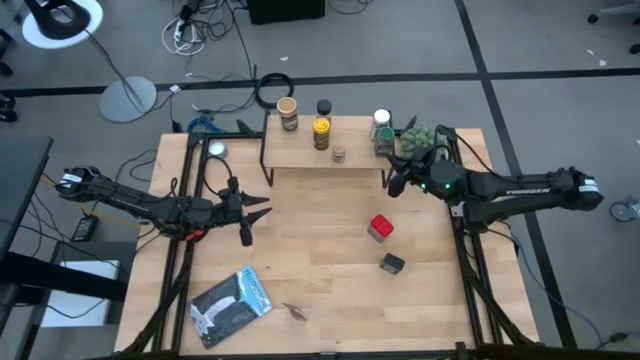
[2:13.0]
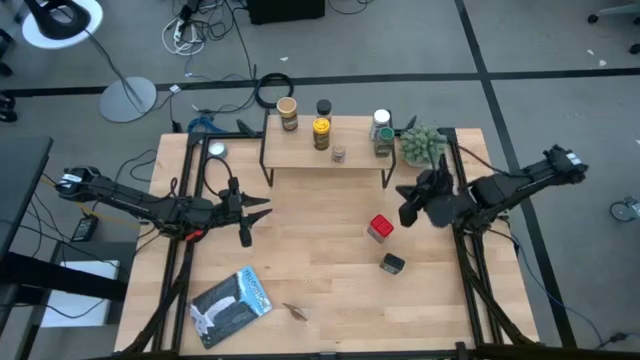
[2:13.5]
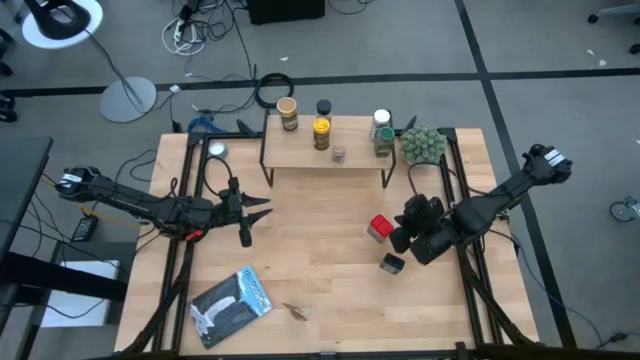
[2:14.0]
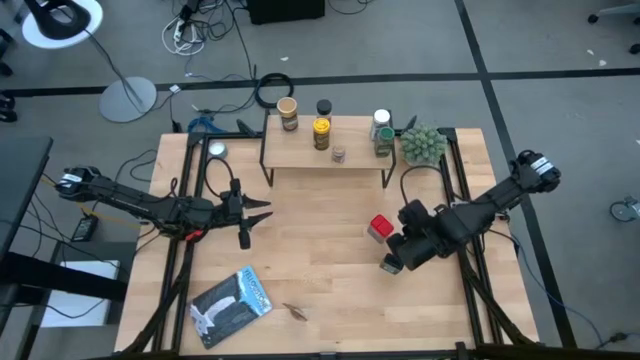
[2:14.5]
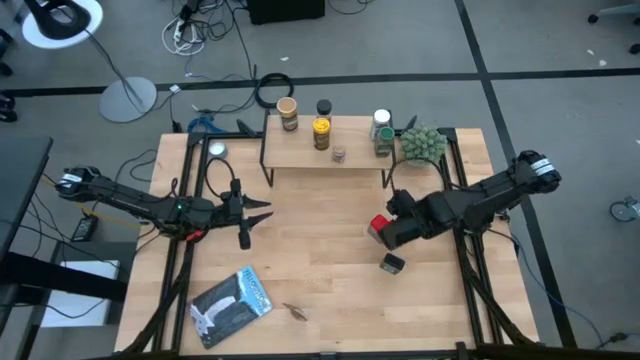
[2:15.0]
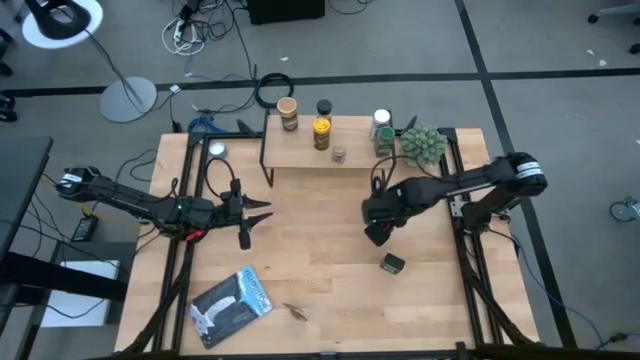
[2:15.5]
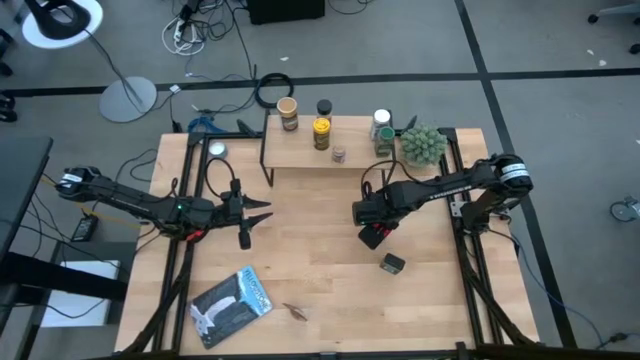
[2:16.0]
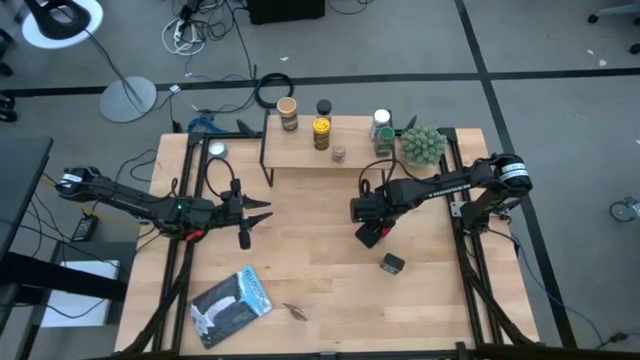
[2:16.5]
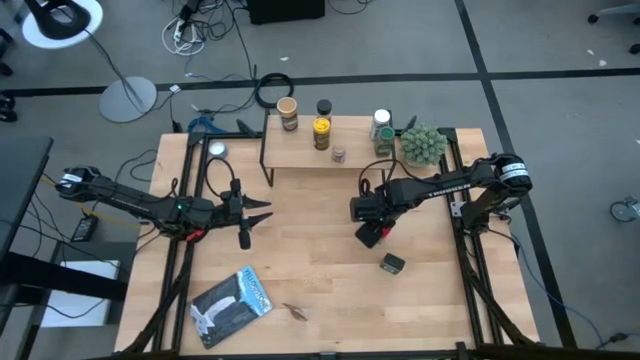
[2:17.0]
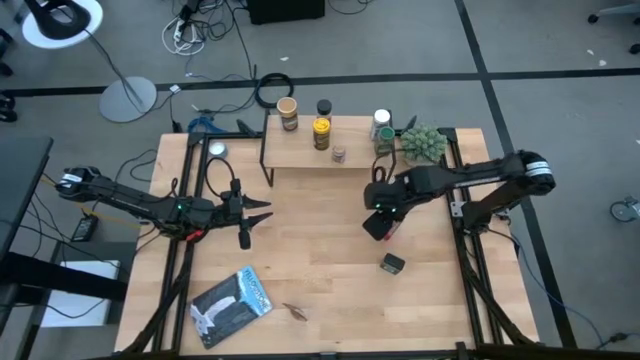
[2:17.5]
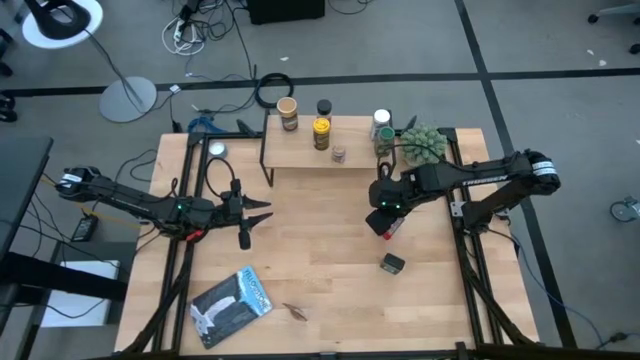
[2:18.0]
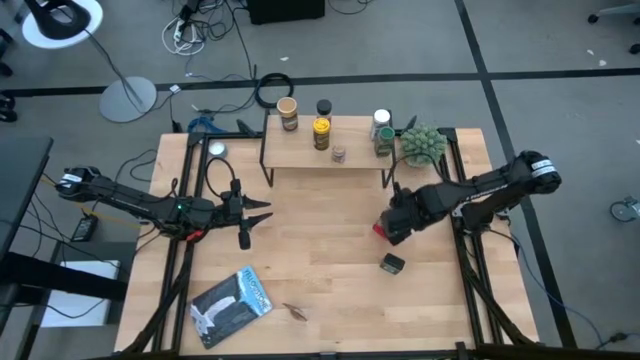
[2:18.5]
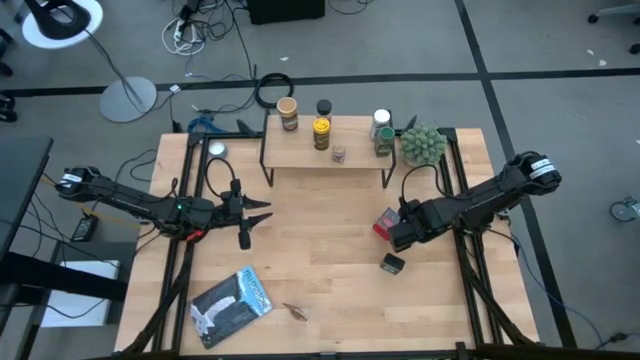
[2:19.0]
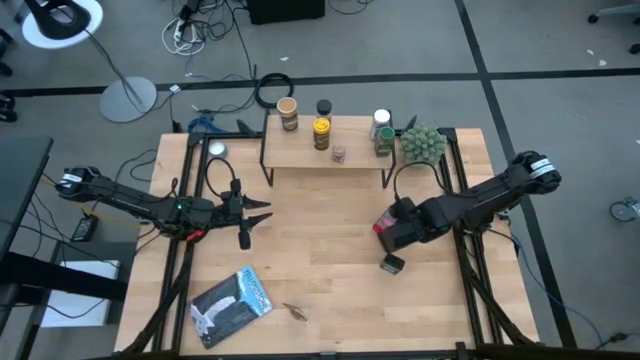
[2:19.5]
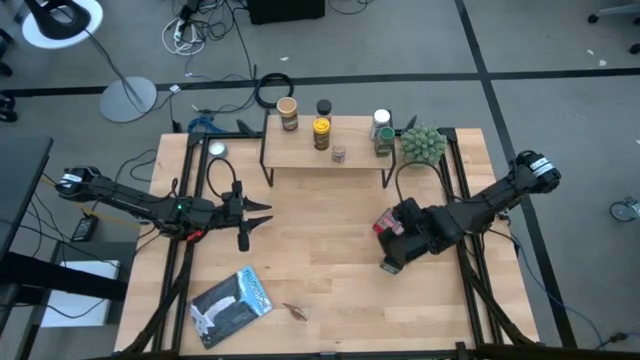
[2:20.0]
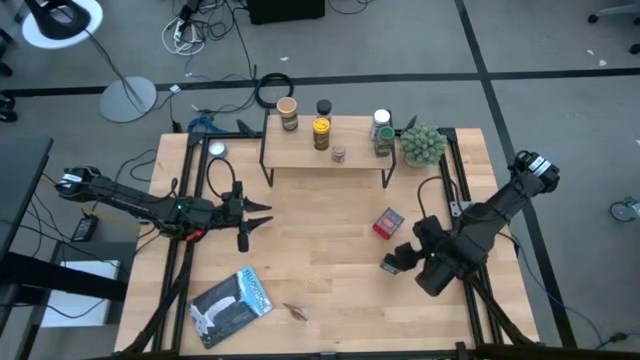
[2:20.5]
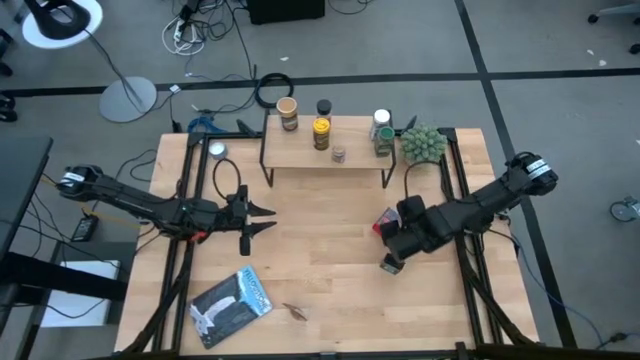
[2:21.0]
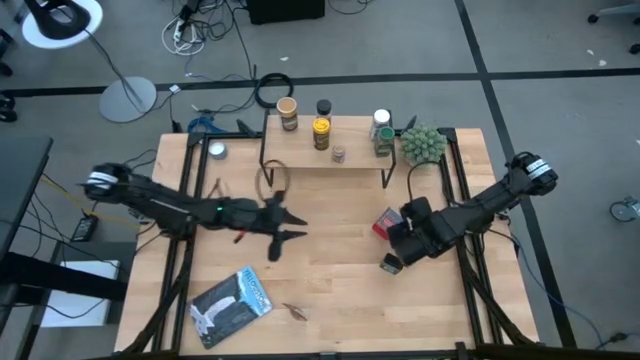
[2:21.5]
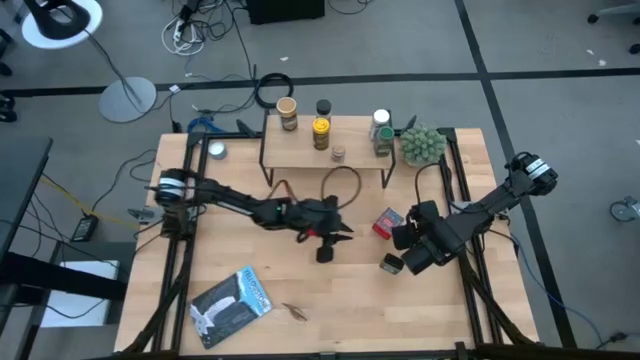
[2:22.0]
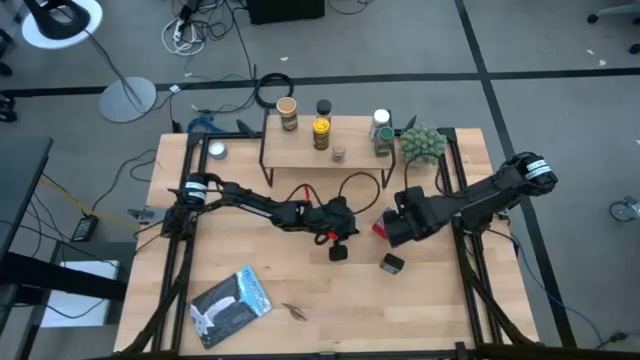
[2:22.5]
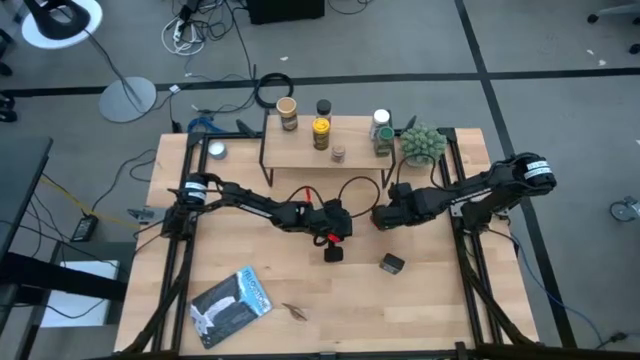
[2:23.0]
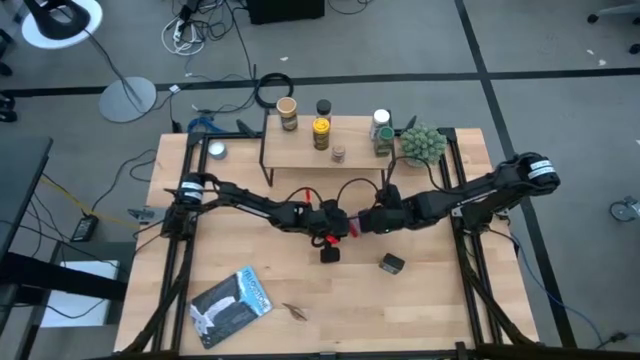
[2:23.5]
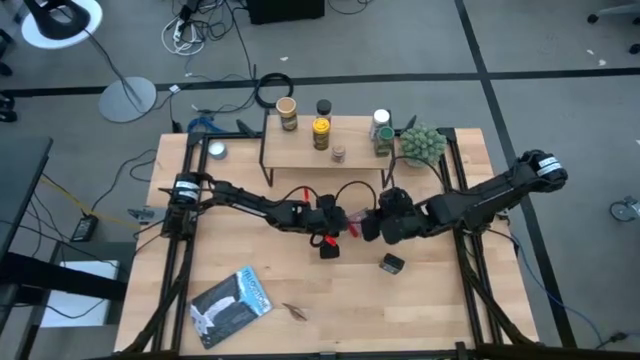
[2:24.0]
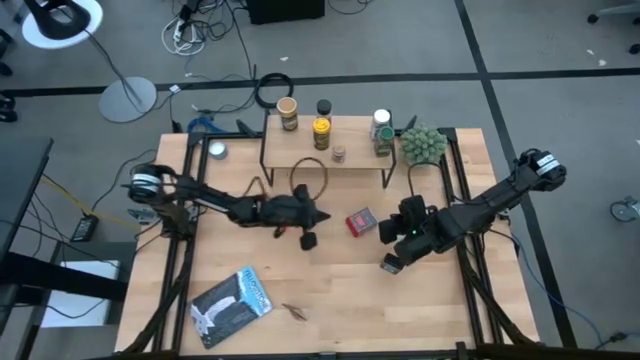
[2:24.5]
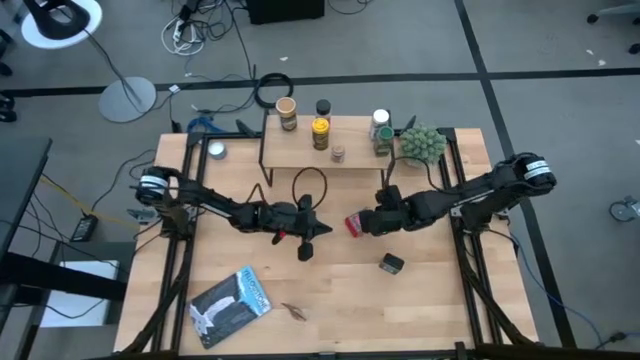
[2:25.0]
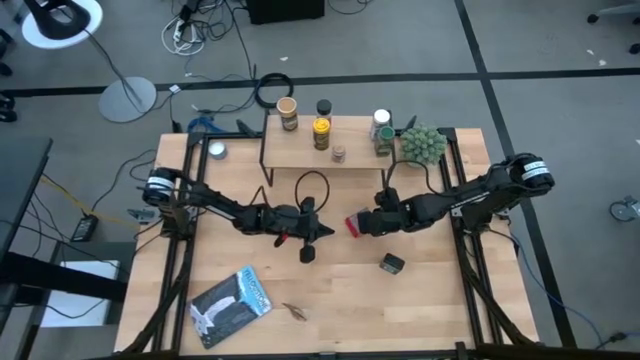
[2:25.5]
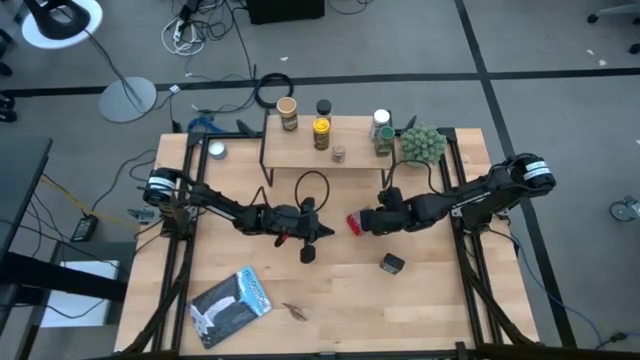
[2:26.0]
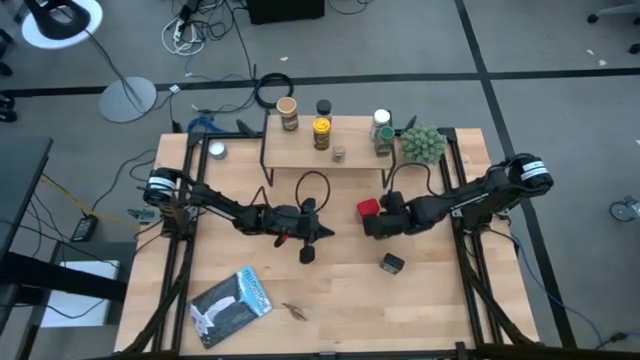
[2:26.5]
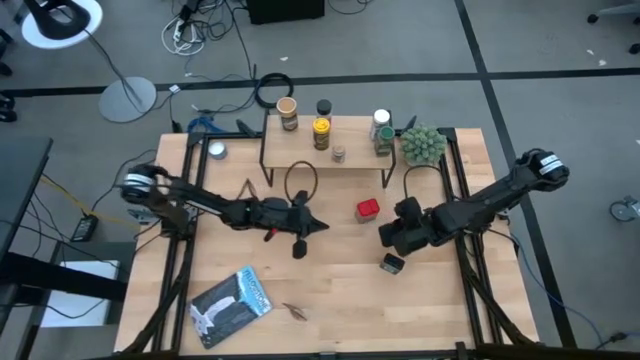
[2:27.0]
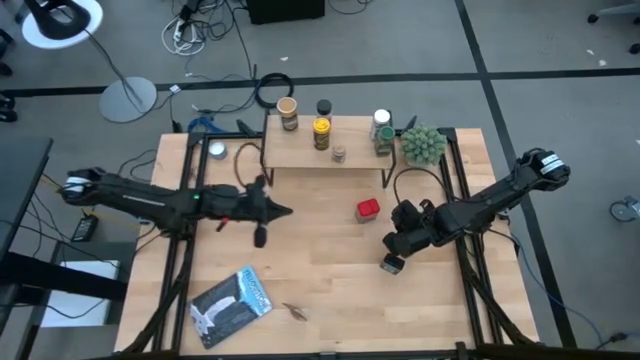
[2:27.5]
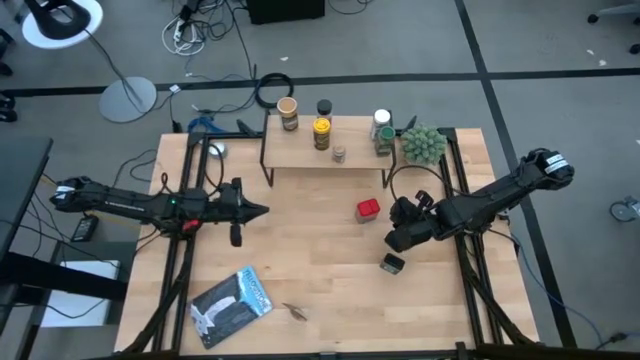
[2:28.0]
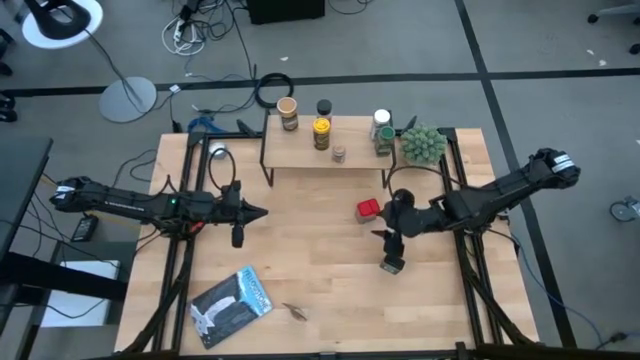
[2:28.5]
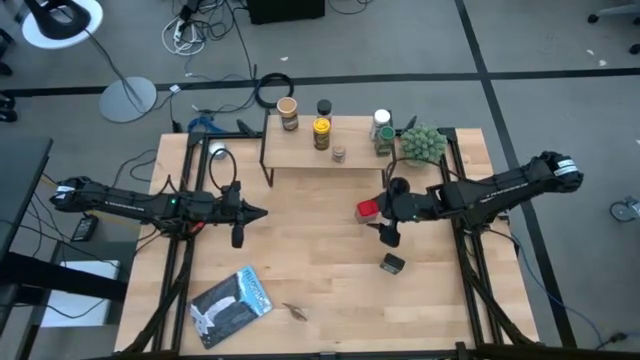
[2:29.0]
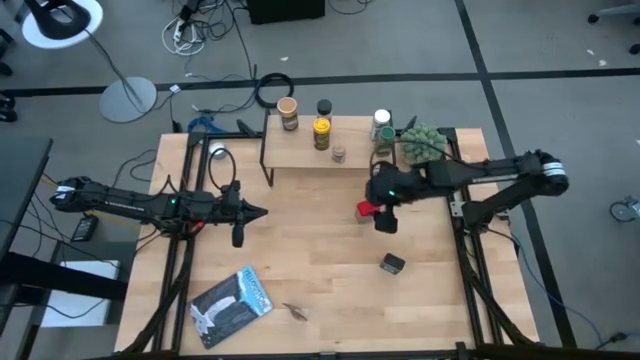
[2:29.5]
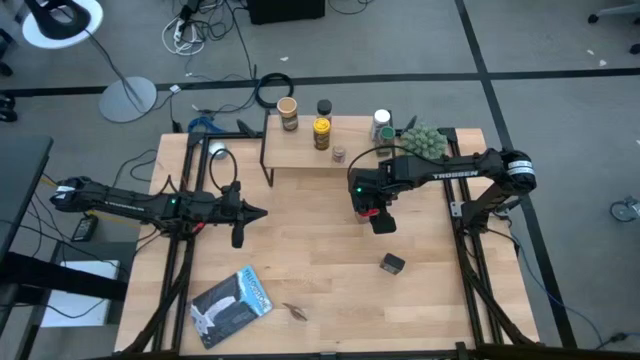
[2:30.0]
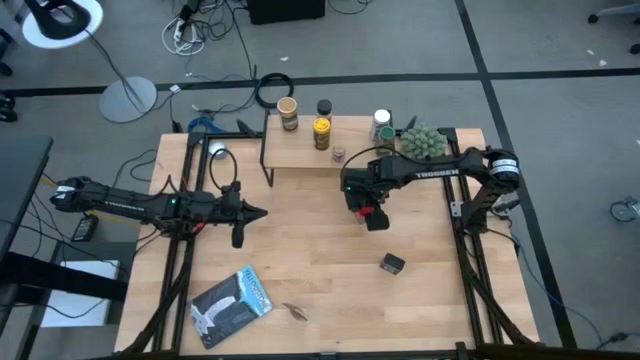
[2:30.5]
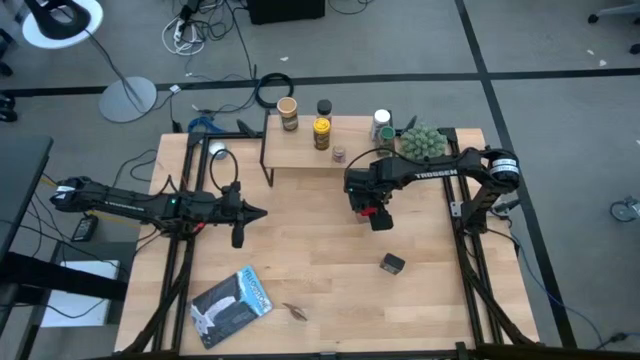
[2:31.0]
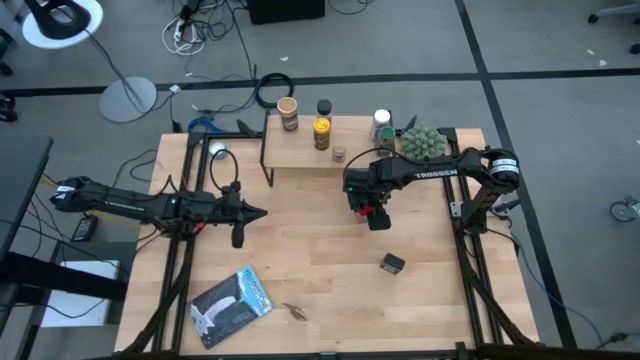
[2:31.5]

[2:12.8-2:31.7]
Task: Shelf spices
Put the red seasoning can on the shelf

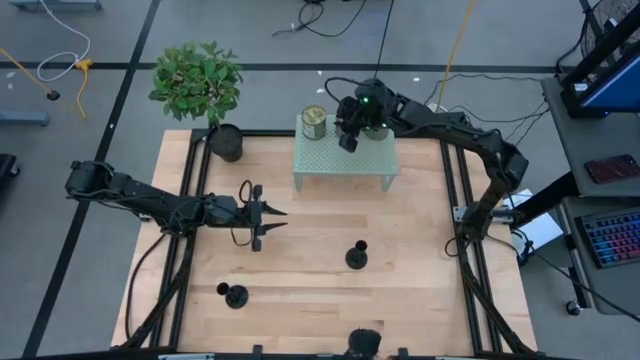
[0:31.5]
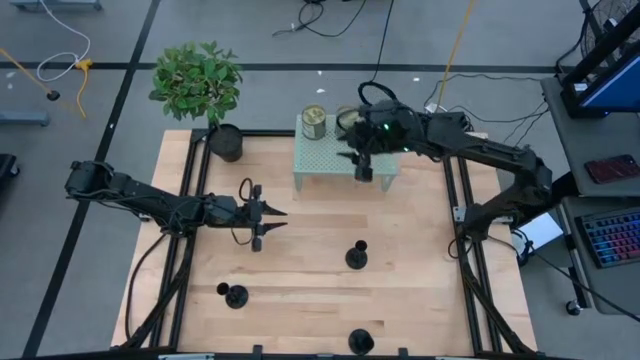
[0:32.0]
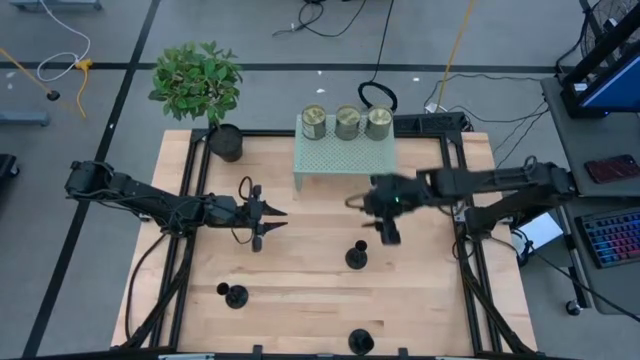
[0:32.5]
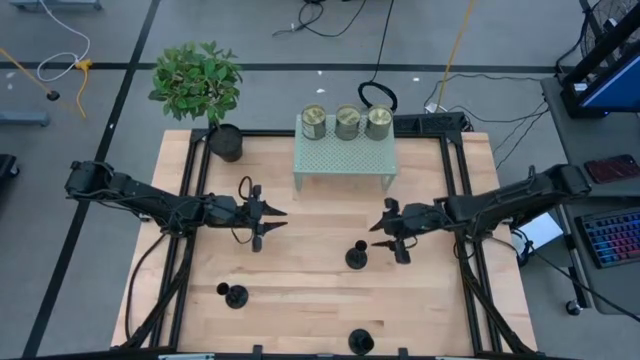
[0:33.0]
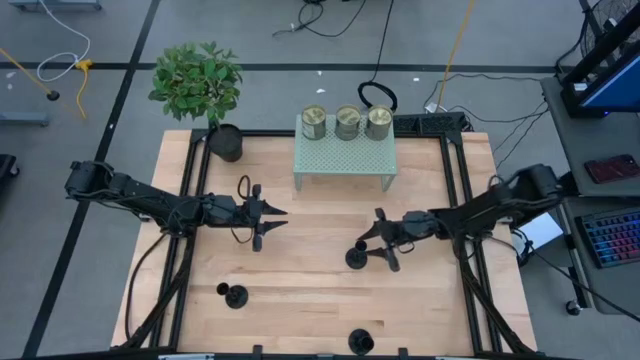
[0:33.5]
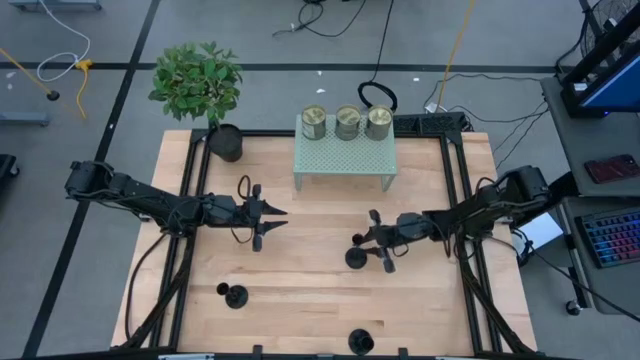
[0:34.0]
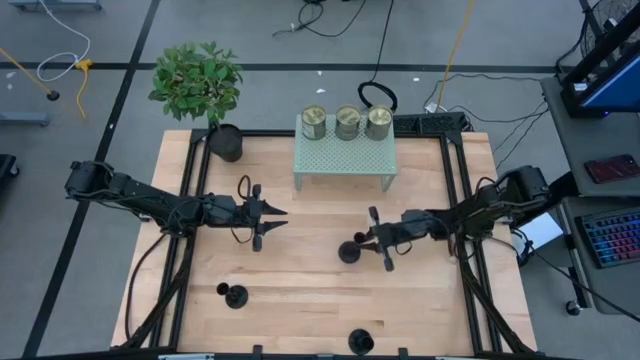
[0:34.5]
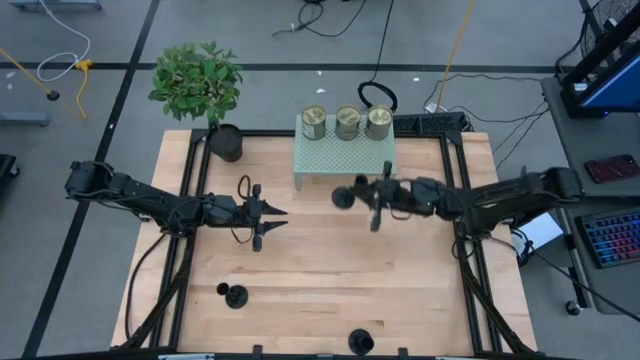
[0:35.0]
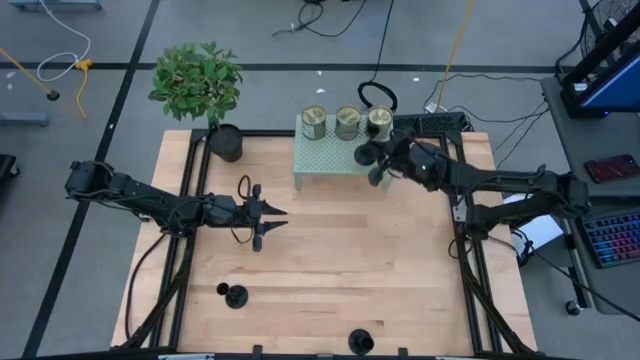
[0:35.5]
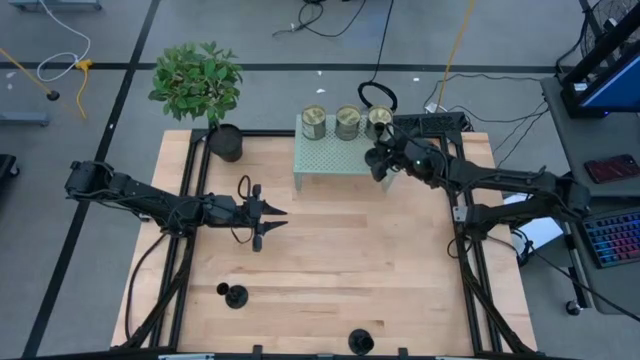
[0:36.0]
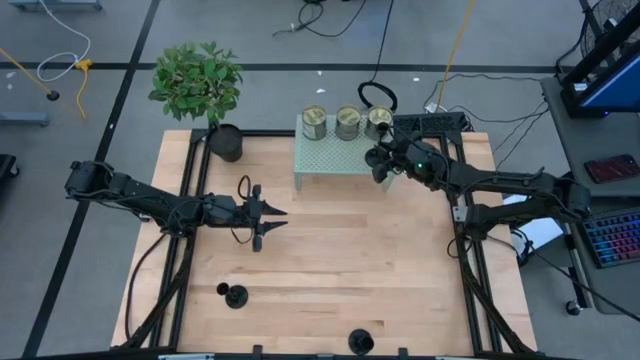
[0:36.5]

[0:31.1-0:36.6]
Task: Pick & Place candle stick holders
Put the top black candle holder on the shelf
